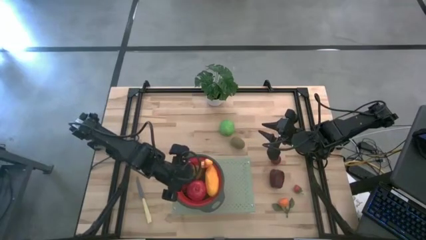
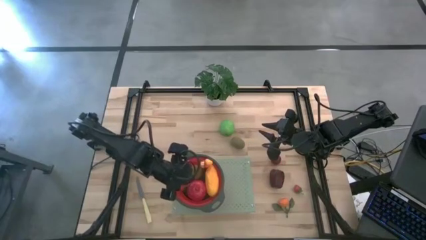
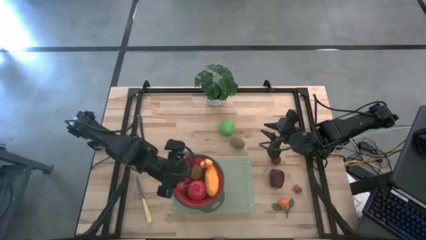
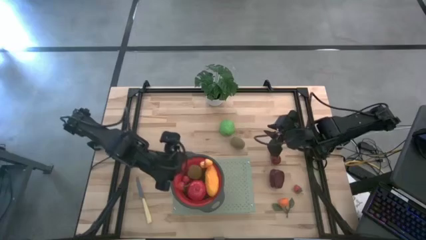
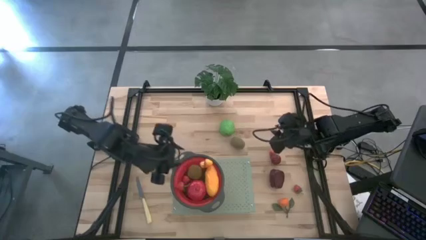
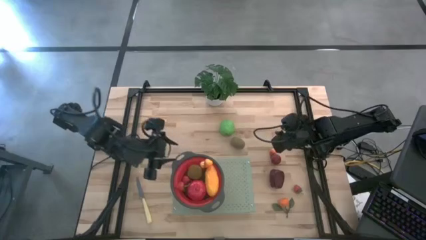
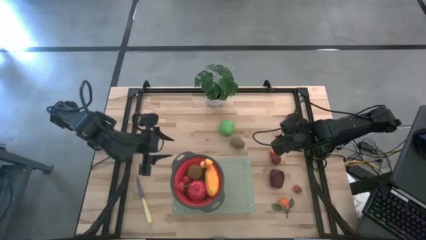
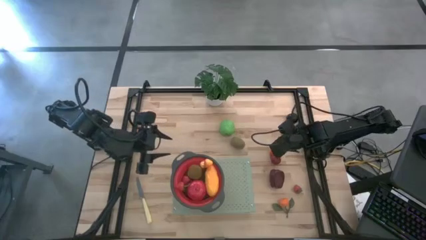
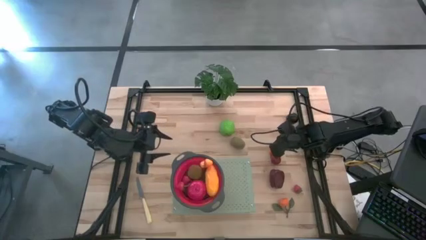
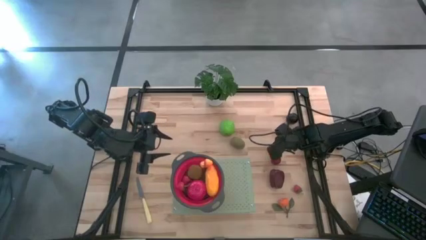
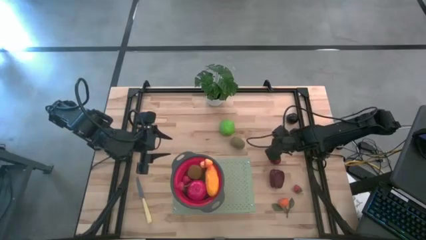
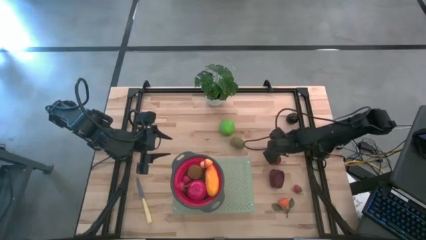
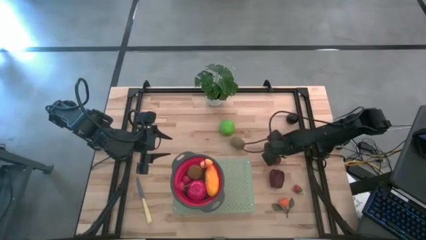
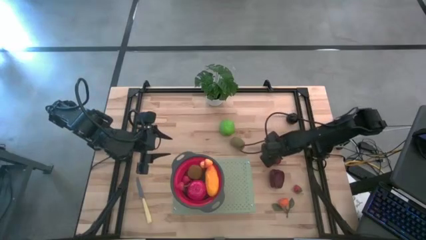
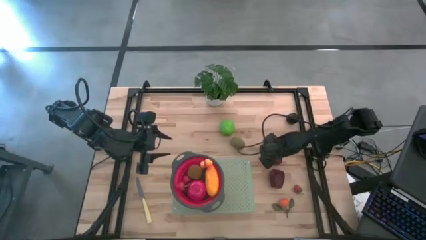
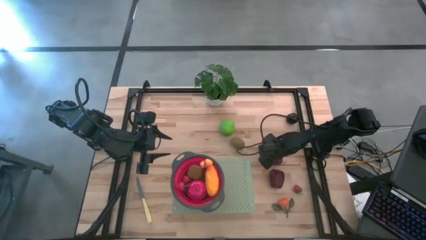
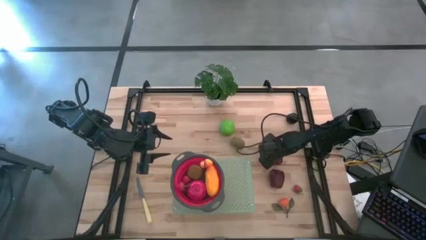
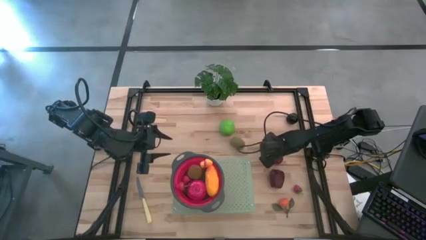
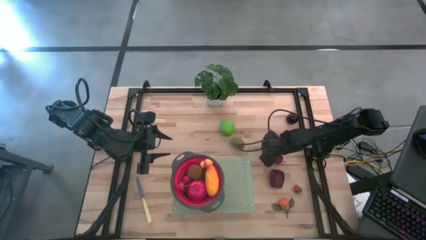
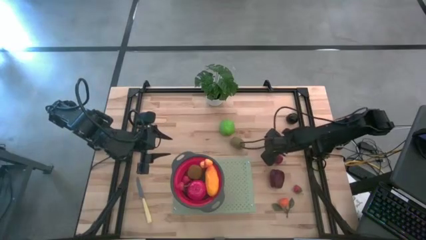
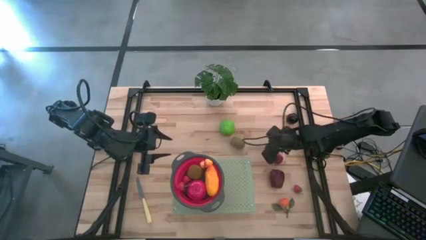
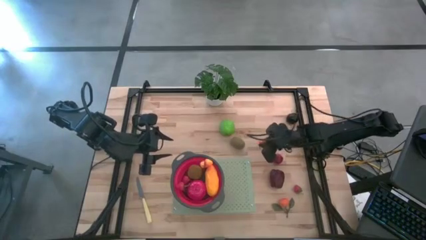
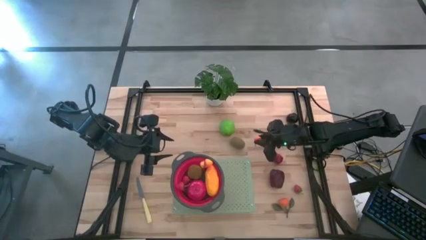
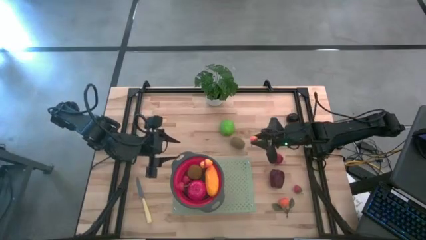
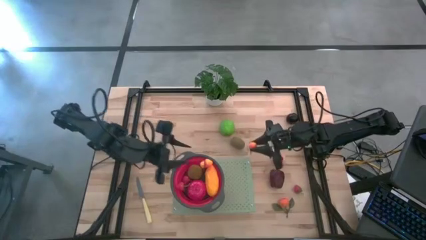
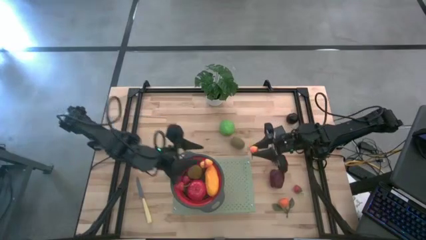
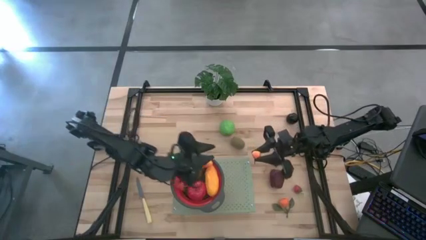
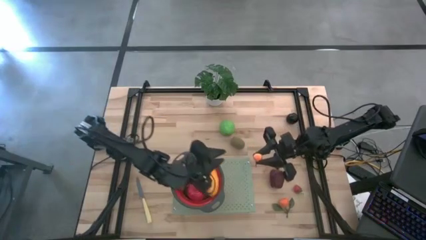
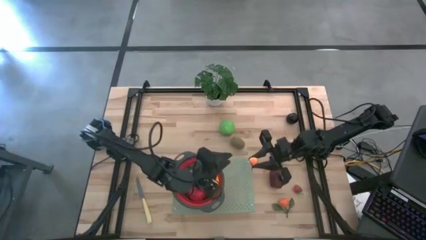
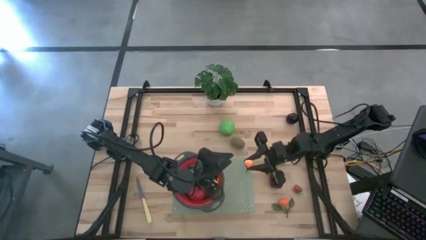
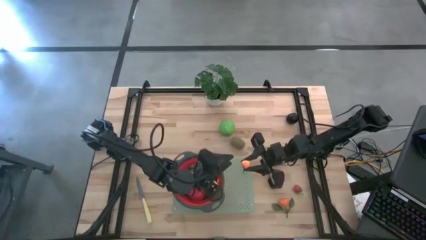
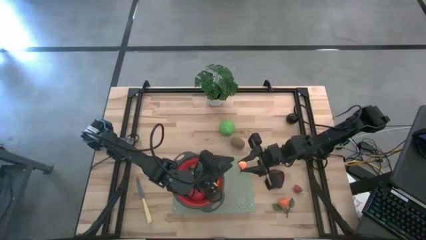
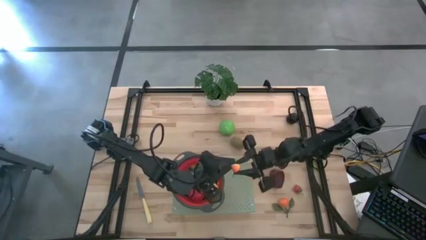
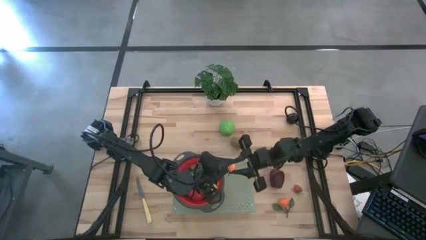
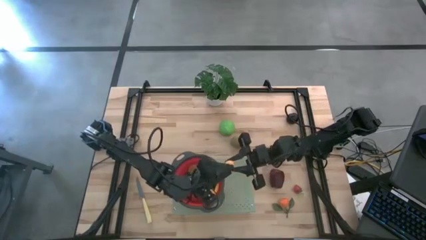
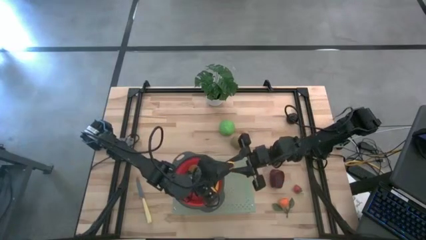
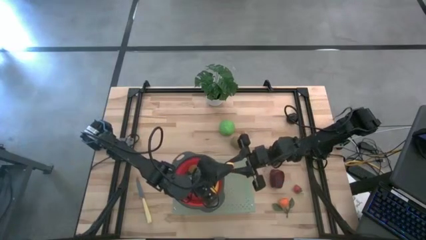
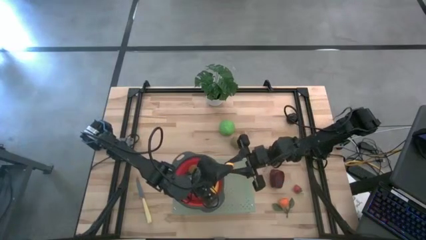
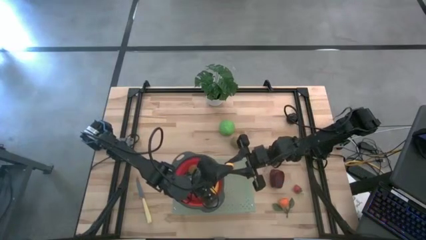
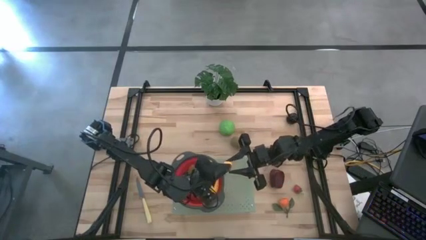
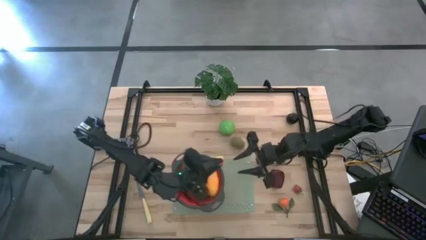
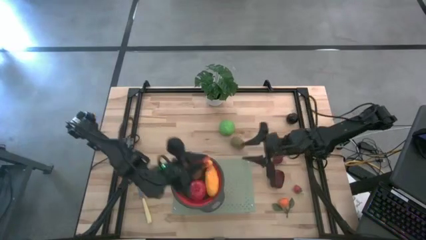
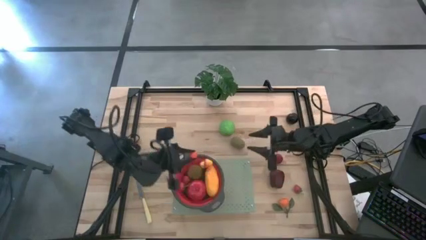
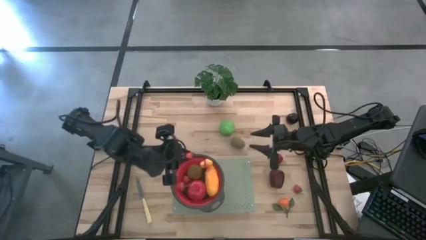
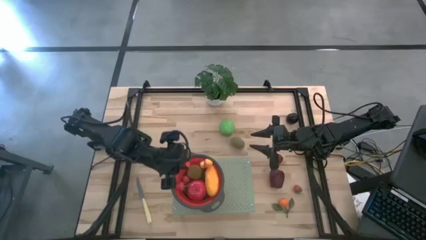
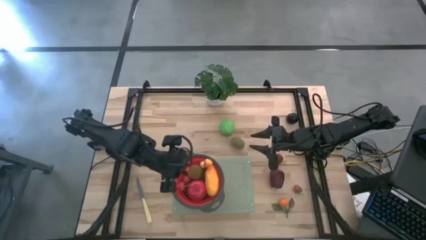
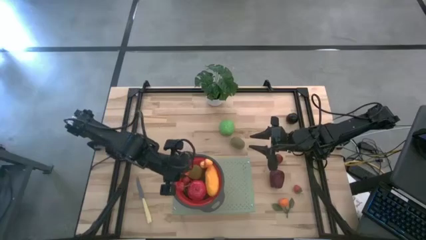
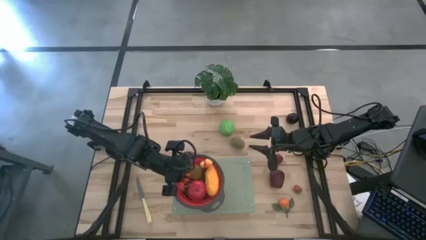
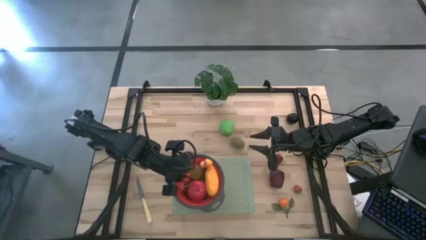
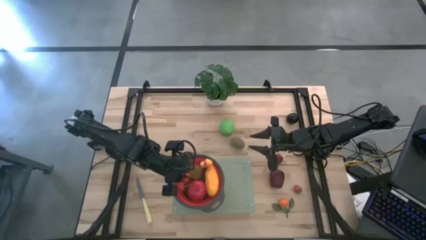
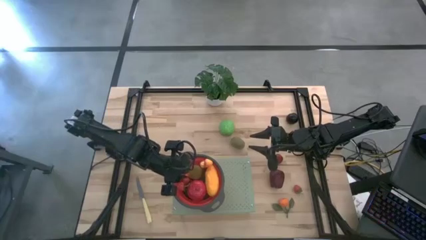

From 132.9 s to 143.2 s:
Task: Pick & Place Fruit
Put the pear into the red strainer

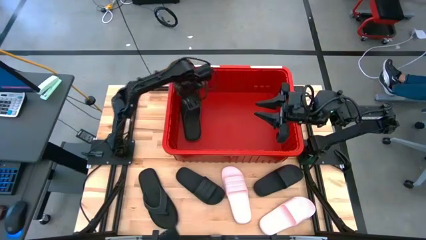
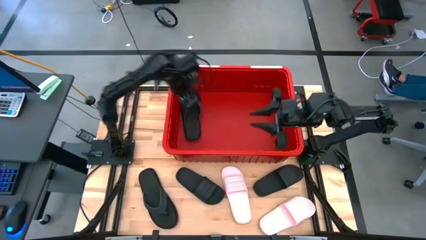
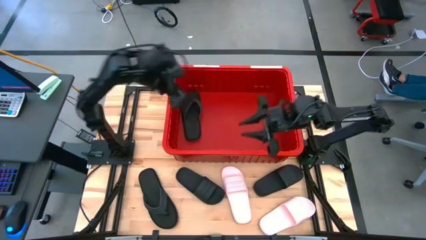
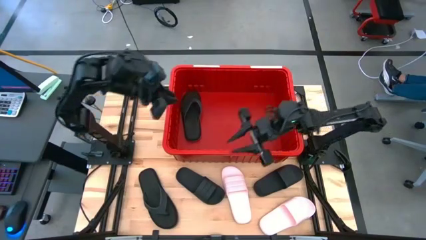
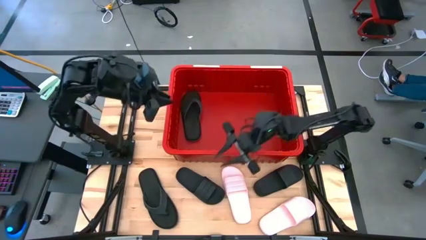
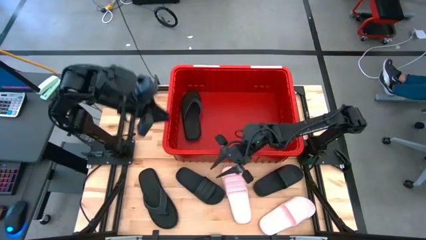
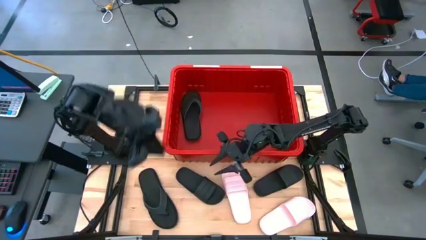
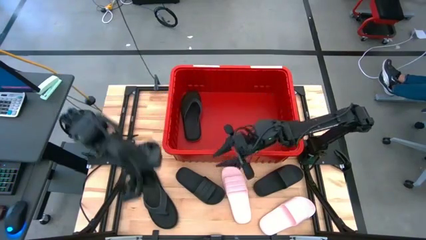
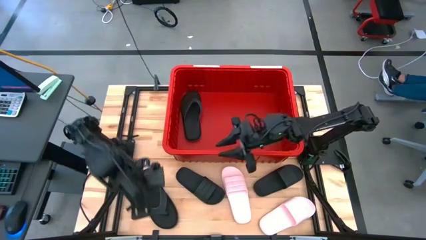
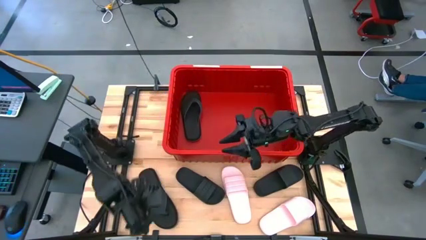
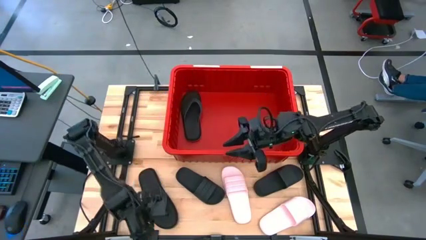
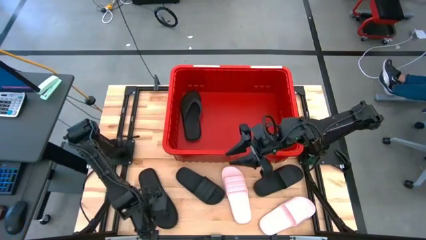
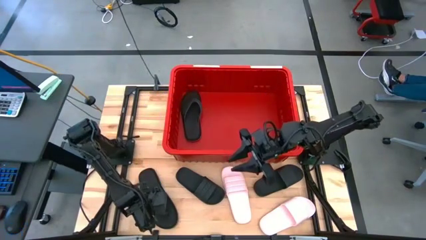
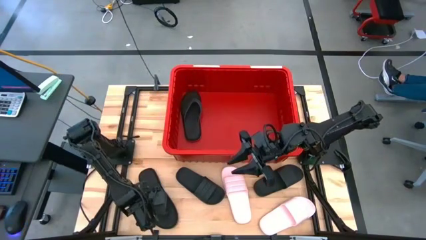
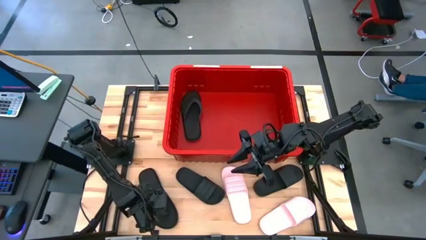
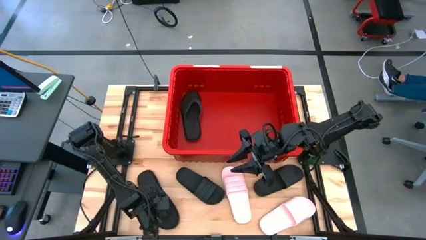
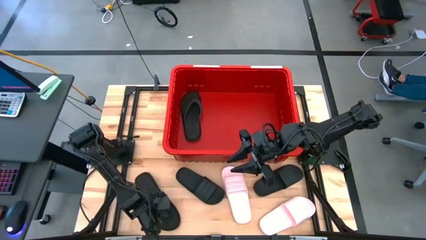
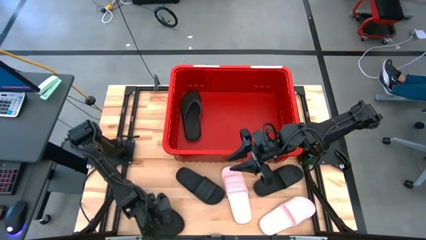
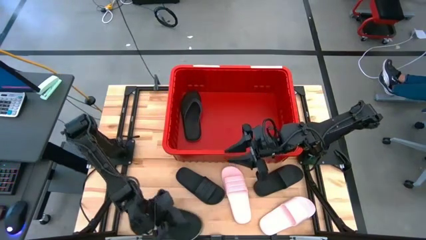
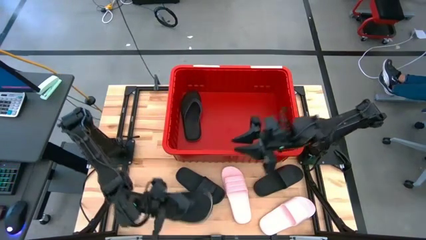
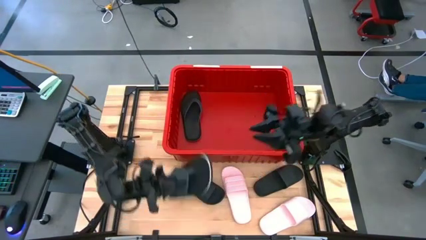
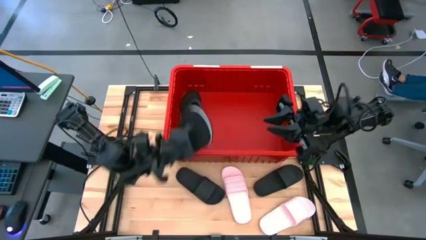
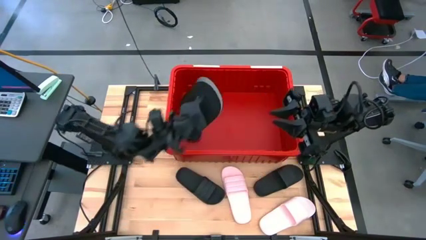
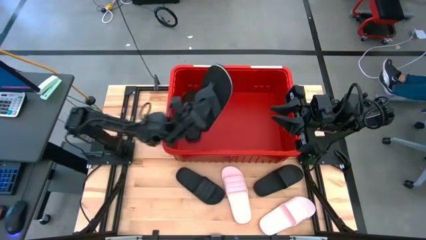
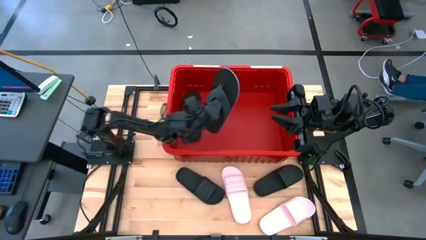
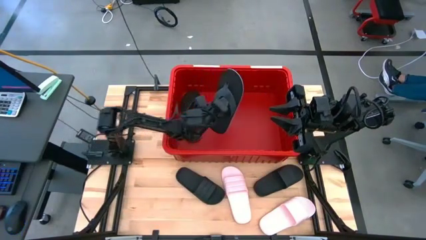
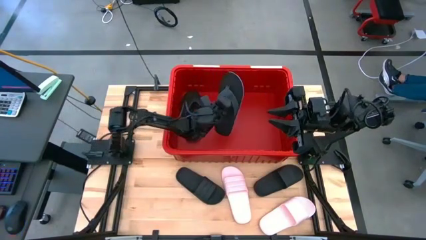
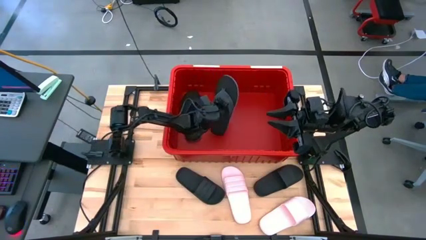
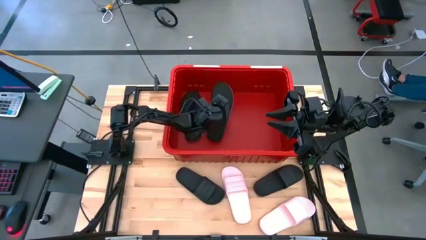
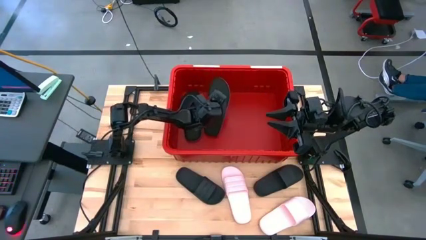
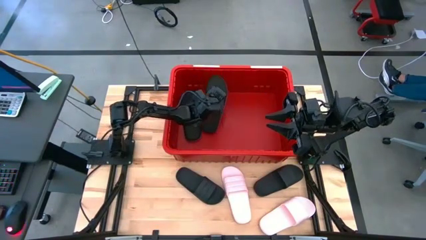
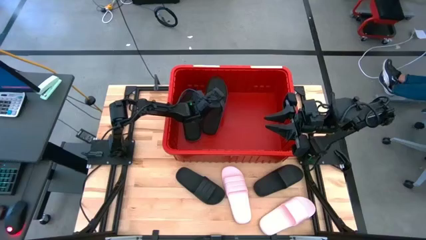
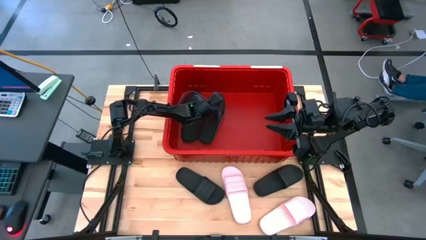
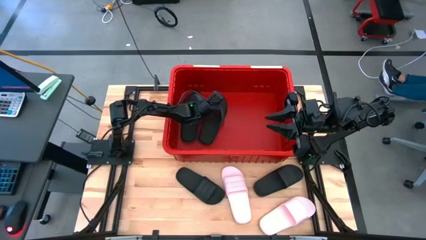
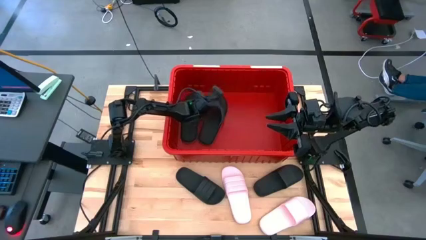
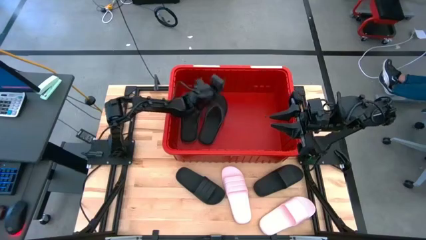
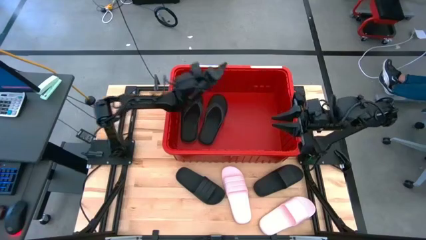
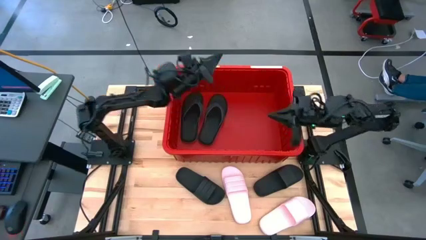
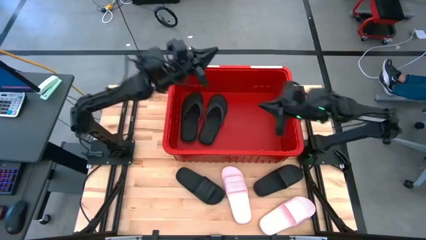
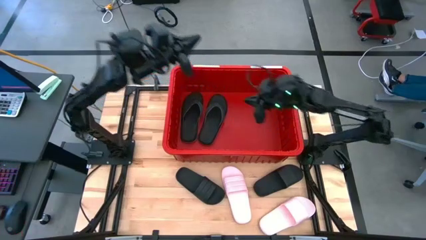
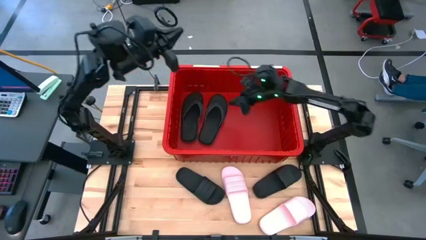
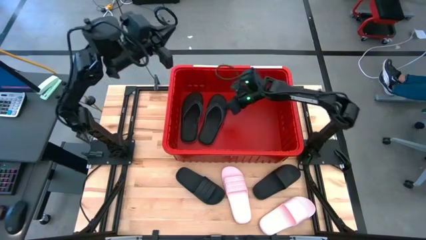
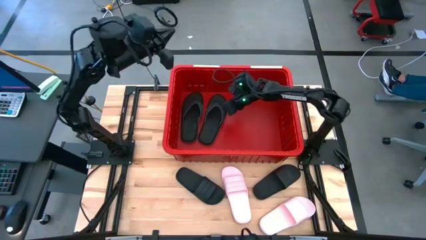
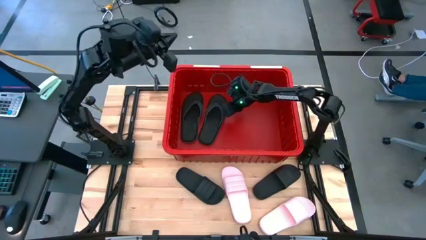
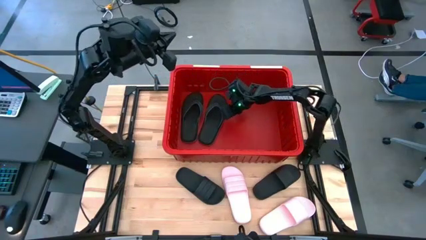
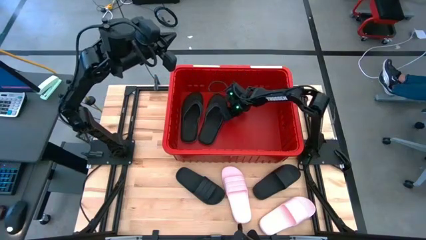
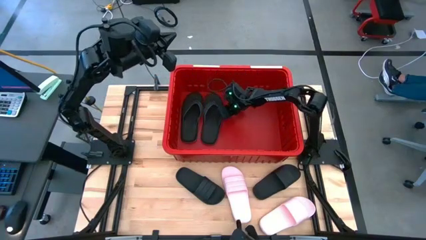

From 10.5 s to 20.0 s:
Task: Pick and place slides into bin
Put the black flip flop into the red bin
